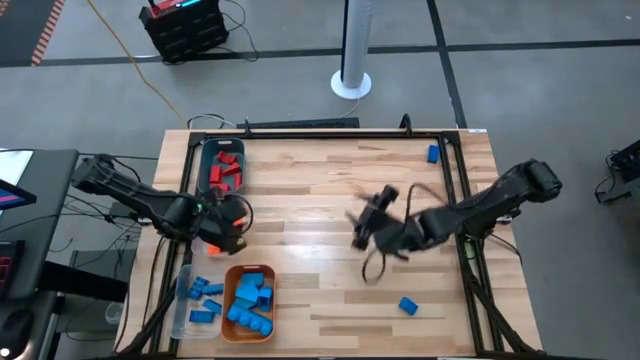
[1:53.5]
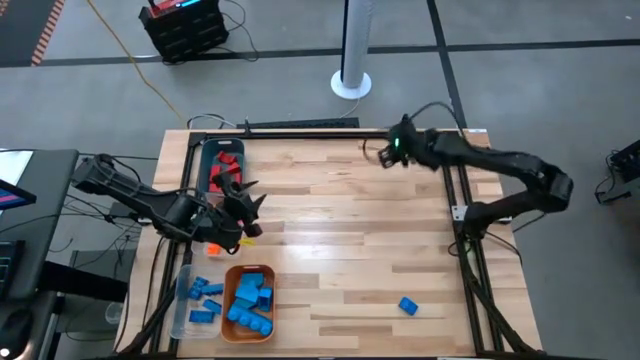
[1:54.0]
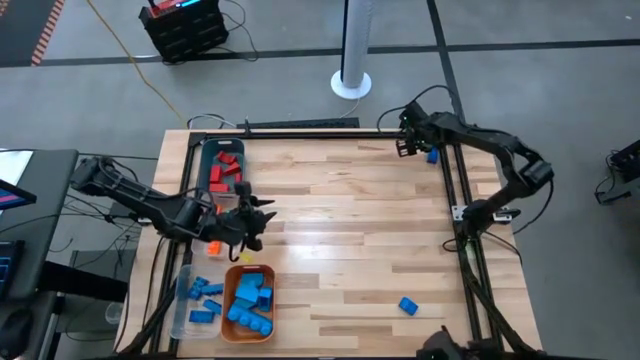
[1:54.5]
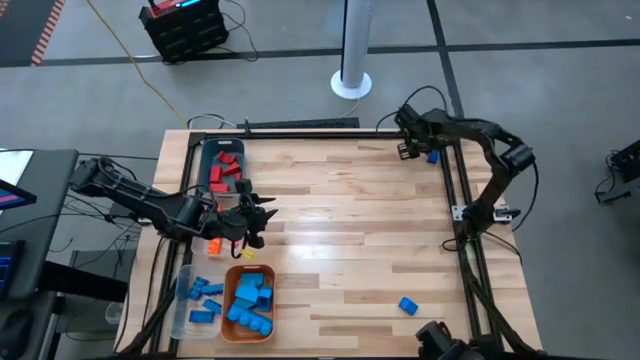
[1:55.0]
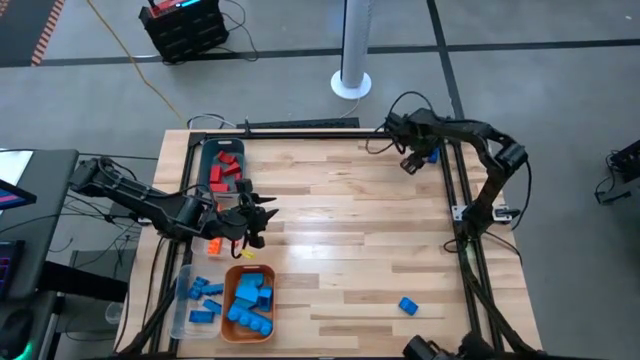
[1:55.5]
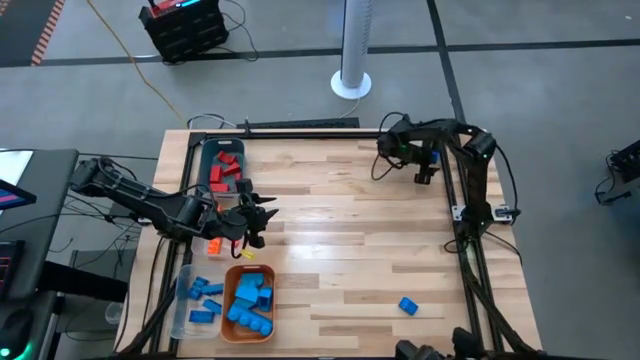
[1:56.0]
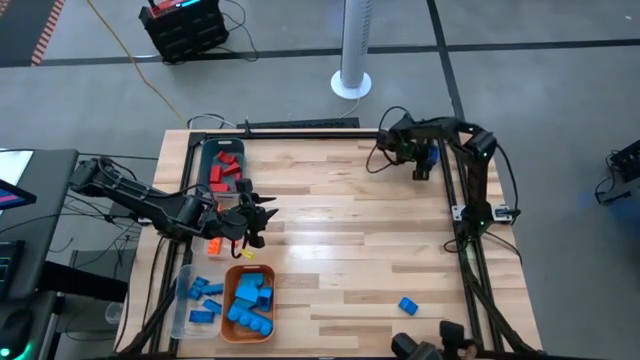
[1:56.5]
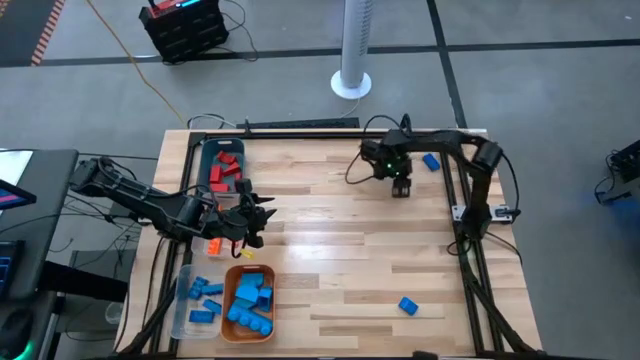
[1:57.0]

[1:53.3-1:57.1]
Task: Sort blocks
Put the blue game piece into the bottom transparent bin

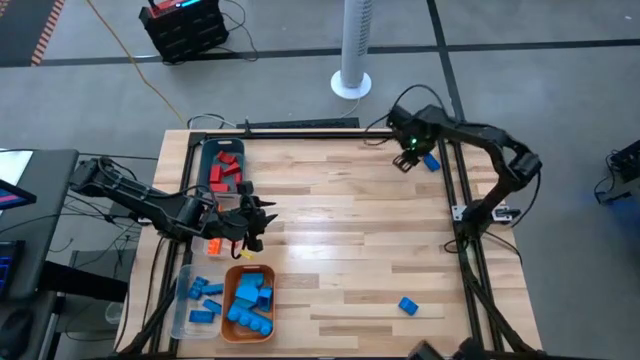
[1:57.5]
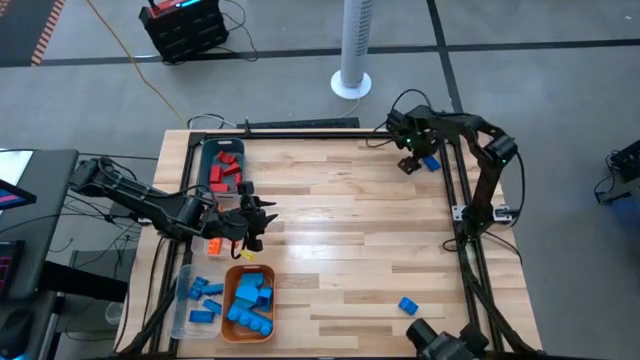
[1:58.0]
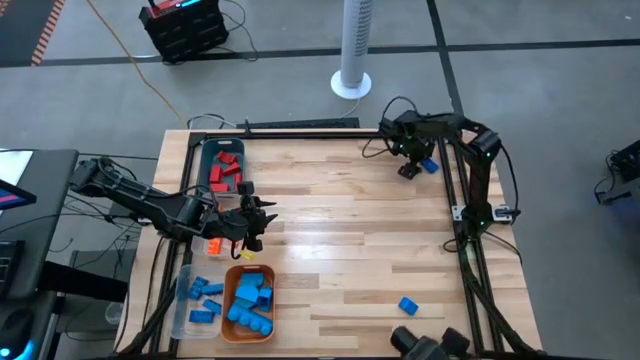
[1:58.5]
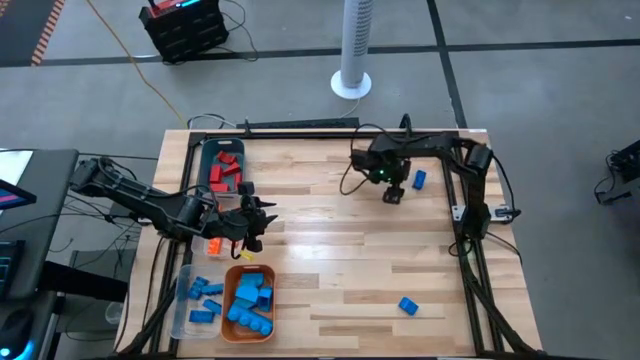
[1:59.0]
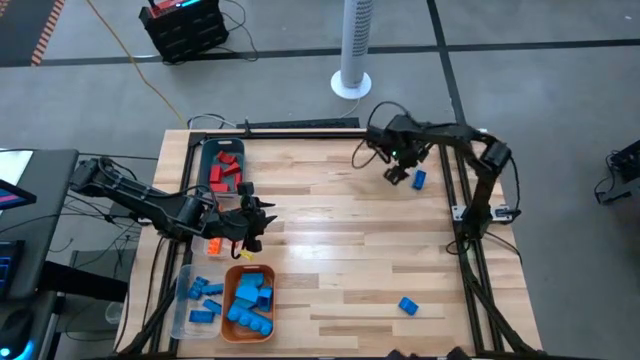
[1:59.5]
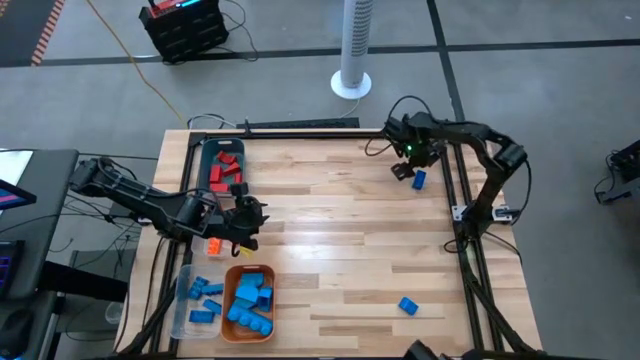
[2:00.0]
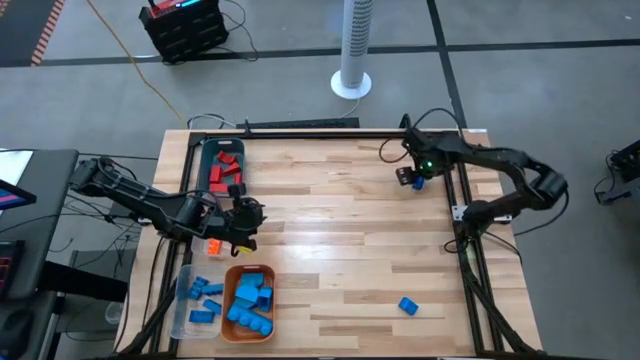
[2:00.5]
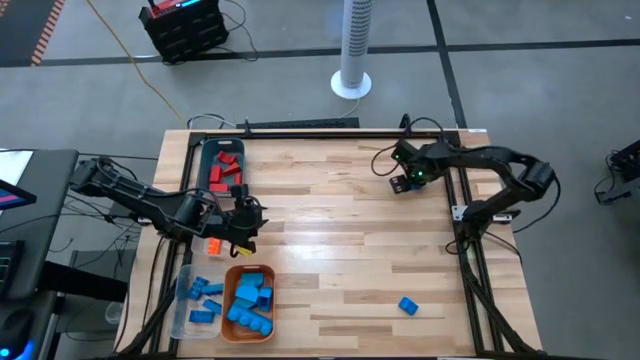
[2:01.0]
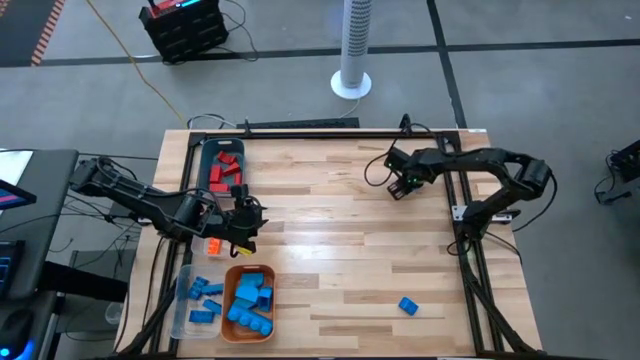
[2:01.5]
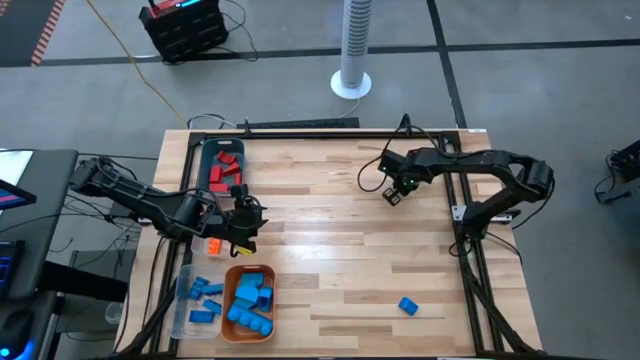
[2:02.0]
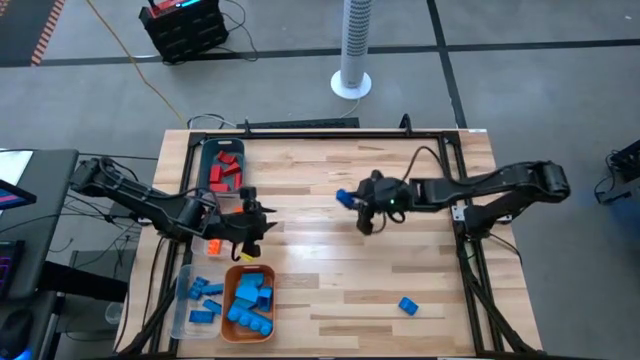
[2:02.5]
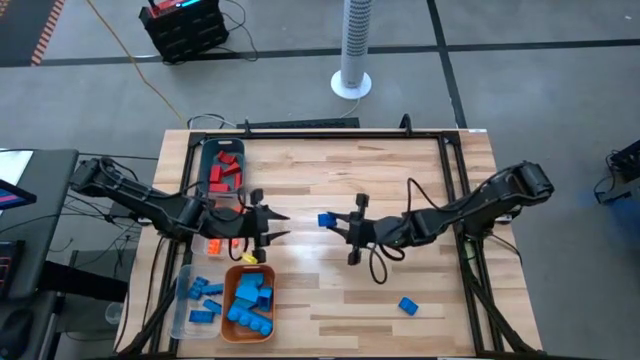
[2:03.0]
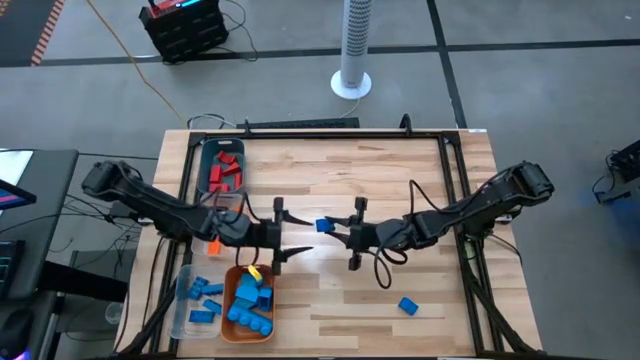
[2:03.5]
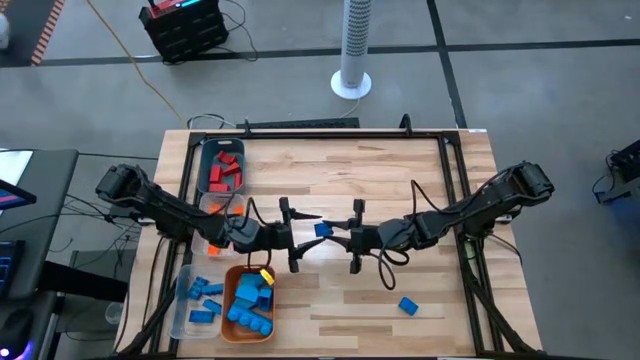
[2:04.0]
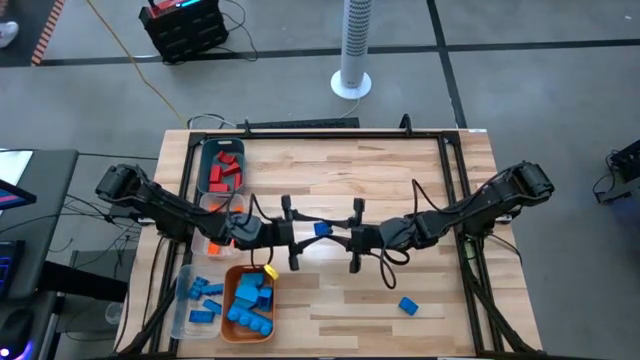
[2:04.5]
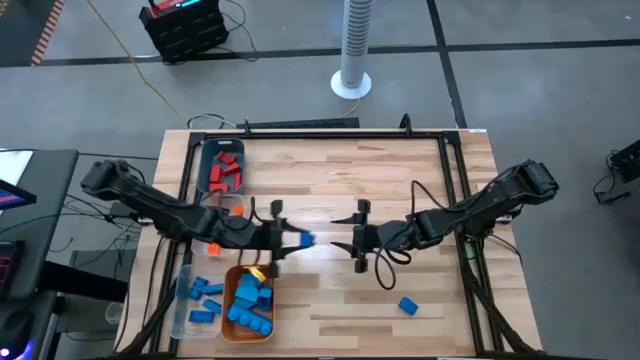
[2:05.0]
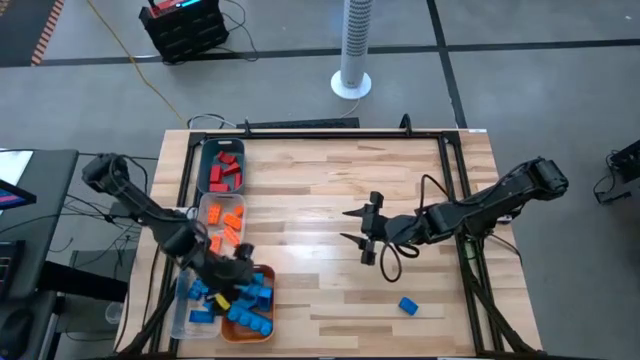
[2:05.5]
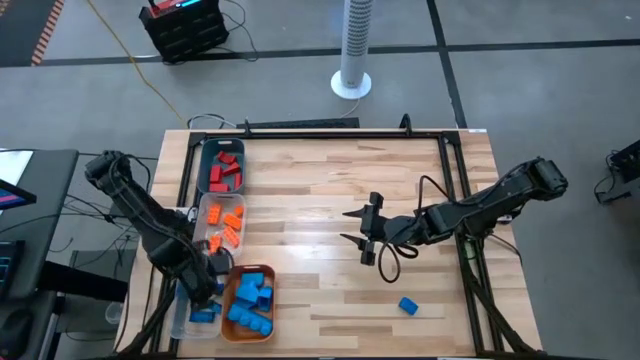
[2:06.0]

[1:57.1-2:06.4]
Put the blue game piece into the bottom transparent bin

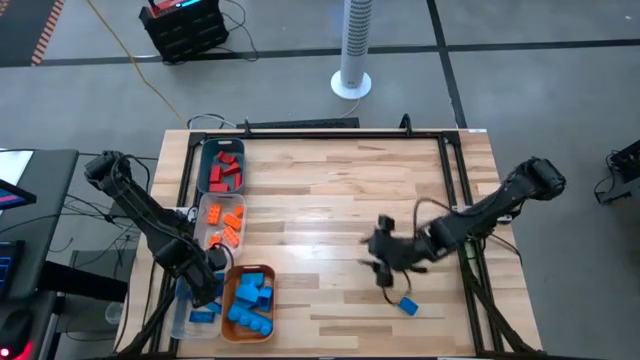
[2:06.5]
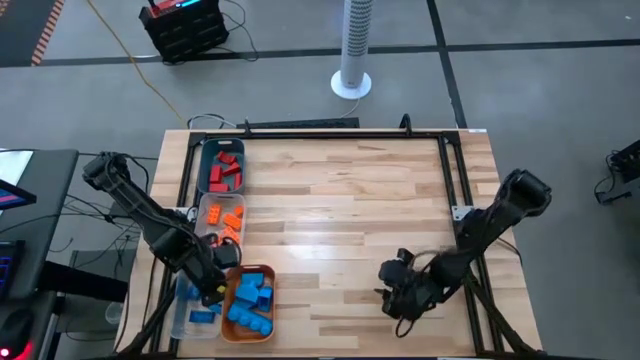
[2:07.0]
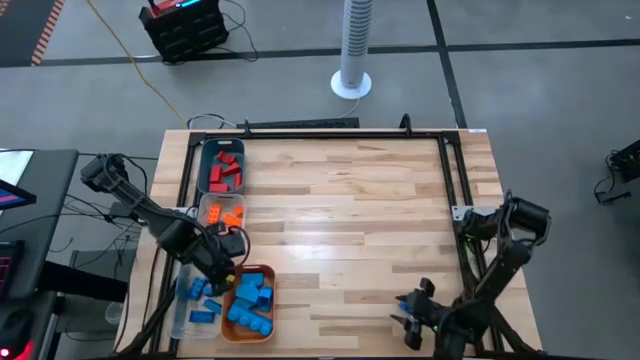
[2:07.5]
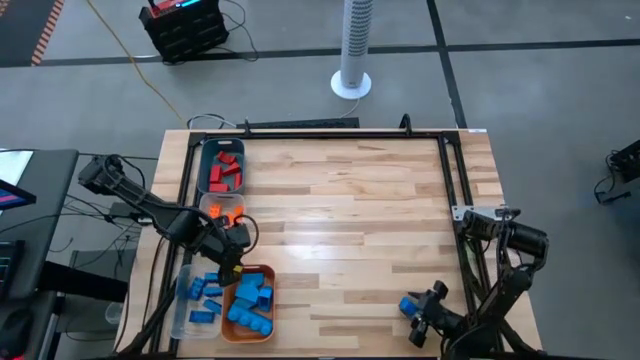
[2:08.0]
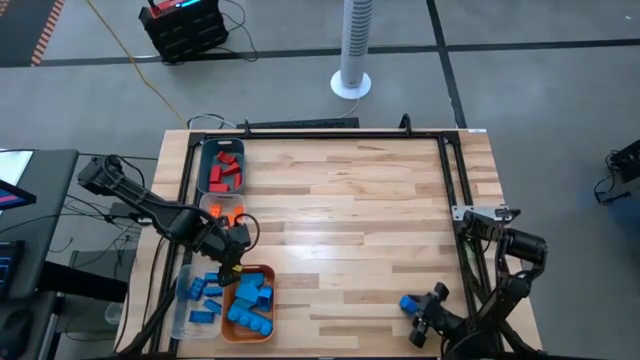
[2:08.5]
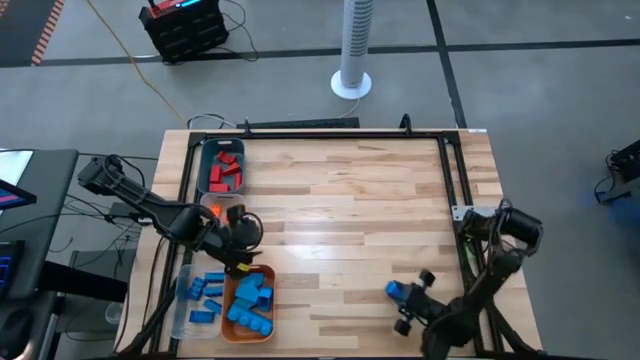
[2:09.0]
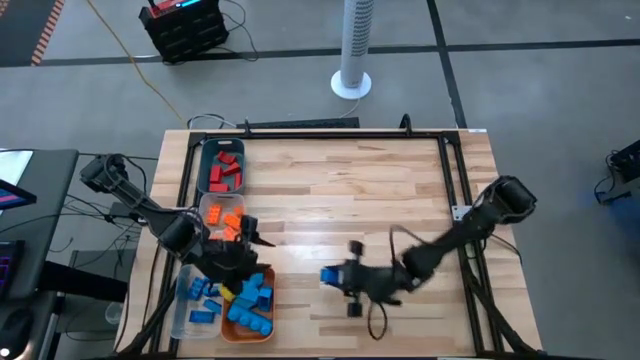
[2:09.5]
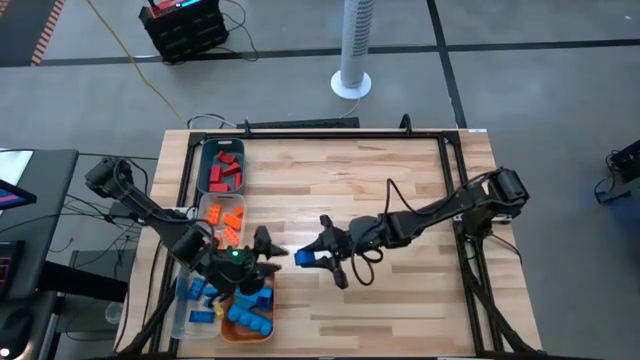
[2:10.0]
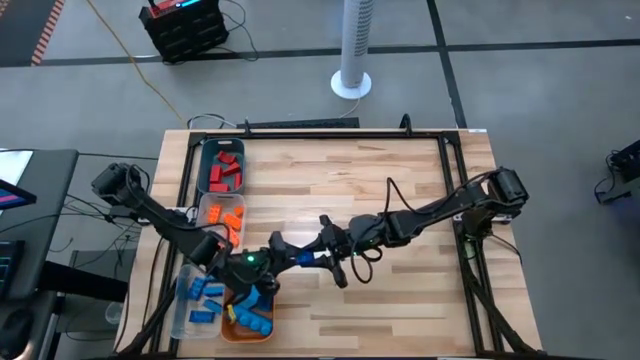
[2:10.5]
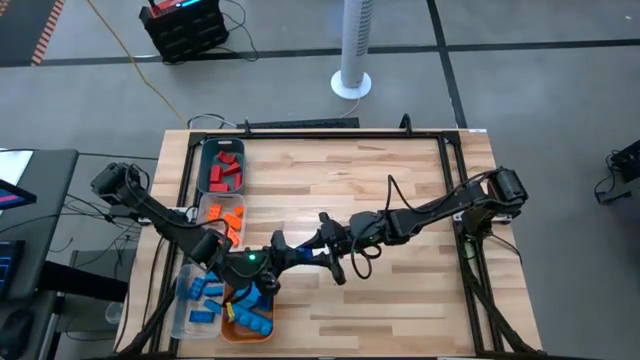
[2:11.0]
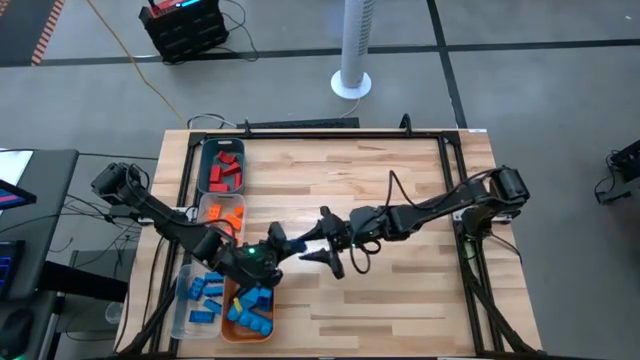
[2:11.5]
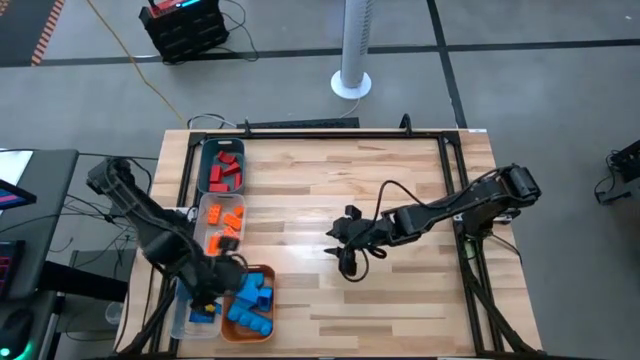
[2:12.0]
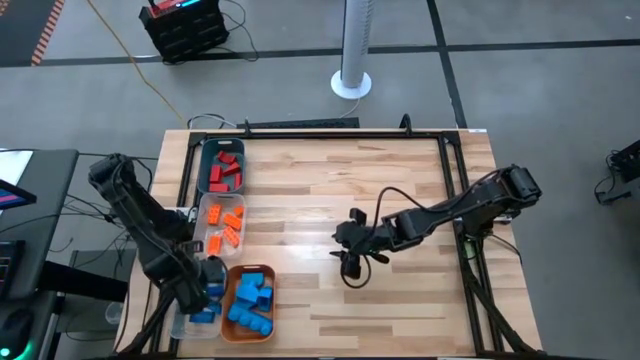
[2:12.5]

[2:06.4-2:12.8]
Put the blue game piece into the bottom transparent bin

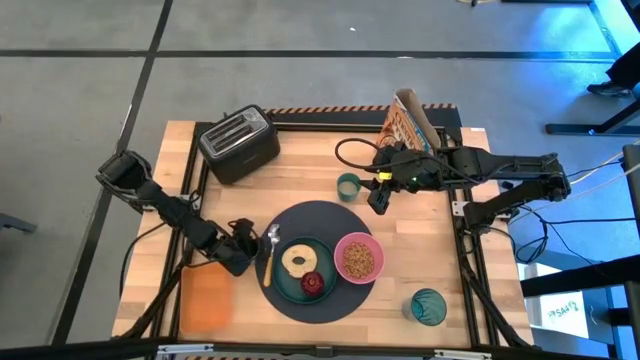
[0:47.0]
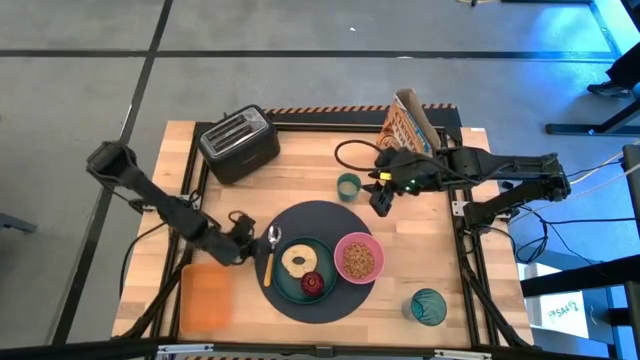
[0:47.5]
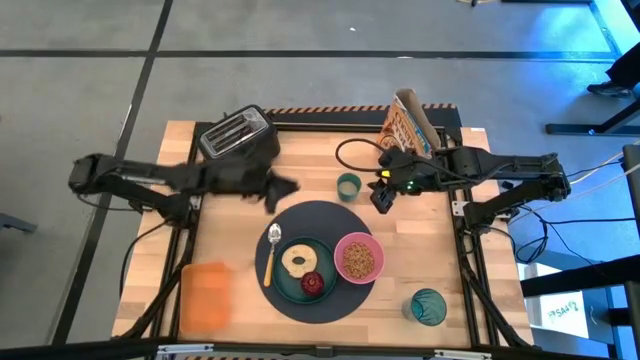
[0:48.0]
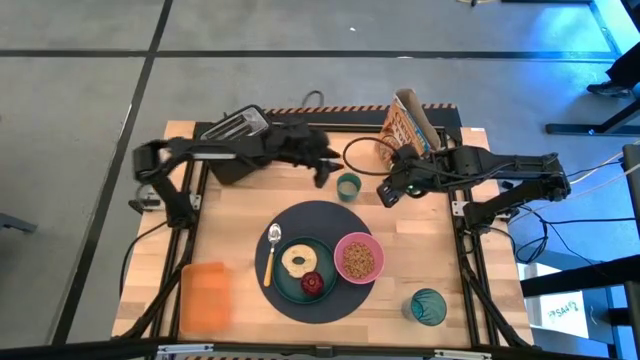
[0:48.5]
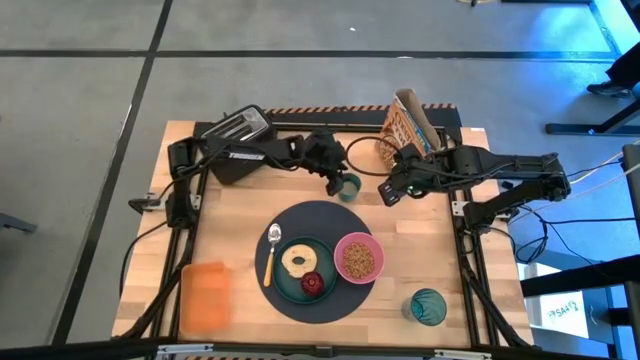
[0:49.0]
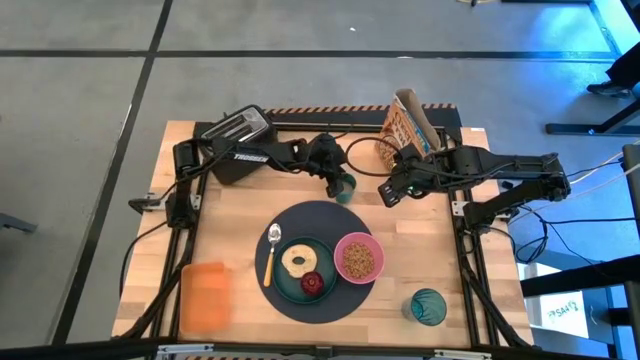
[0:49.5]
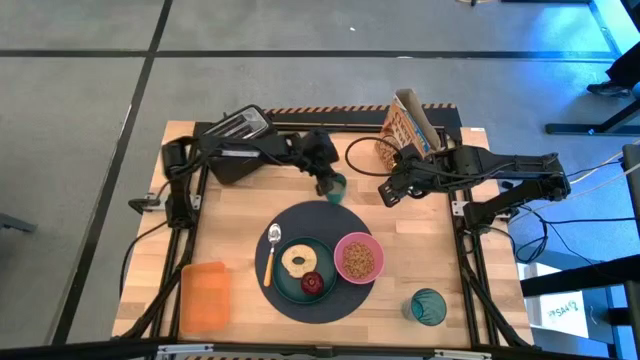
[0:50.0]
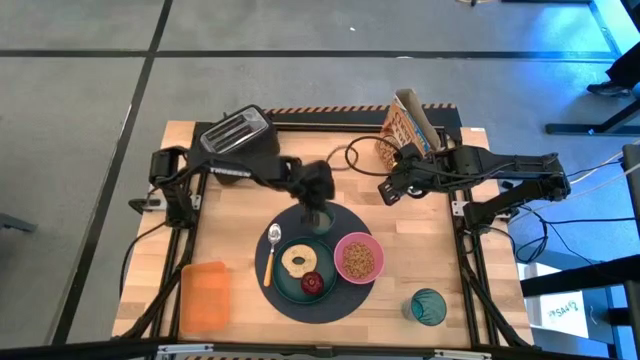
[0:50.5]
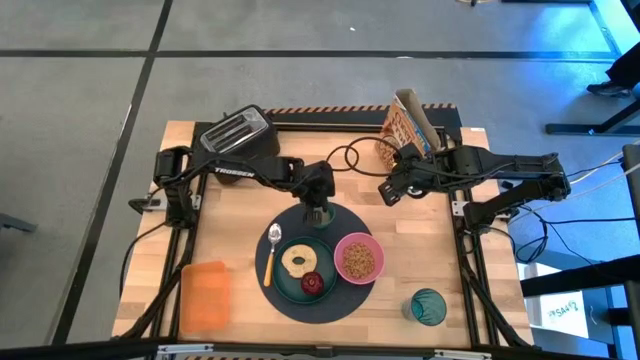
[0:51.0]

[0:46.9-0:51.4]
Task: Arrange a breakfast setting
Put the green cup of rice grain to the top side of the green plate on the placemat
